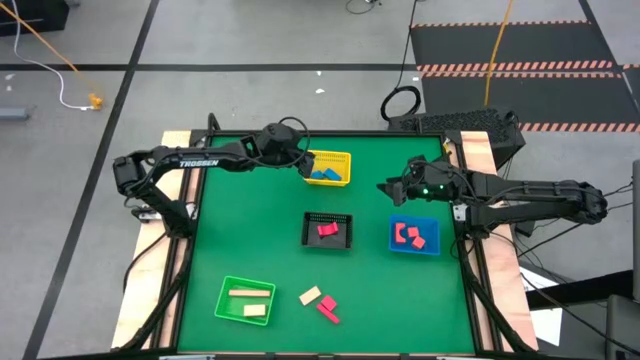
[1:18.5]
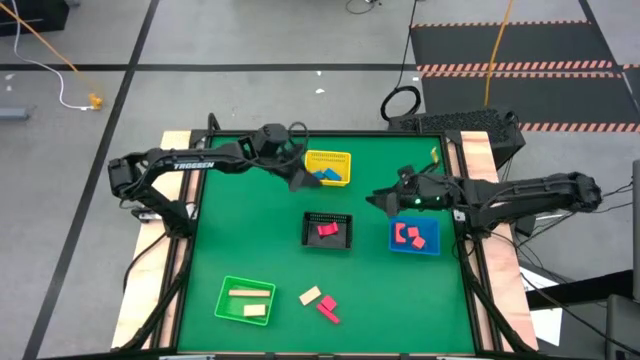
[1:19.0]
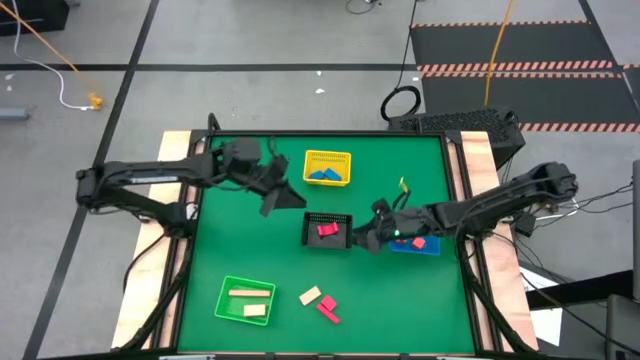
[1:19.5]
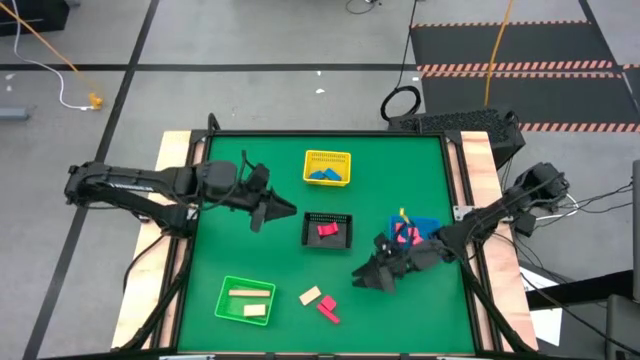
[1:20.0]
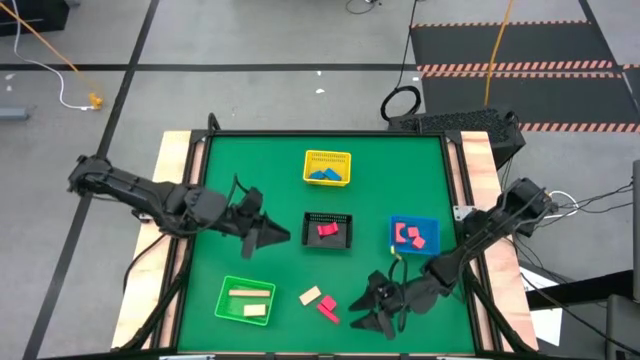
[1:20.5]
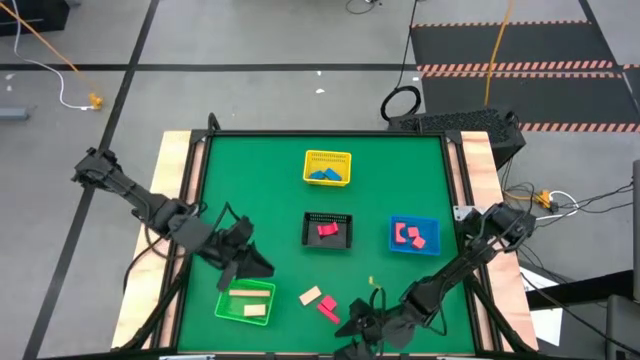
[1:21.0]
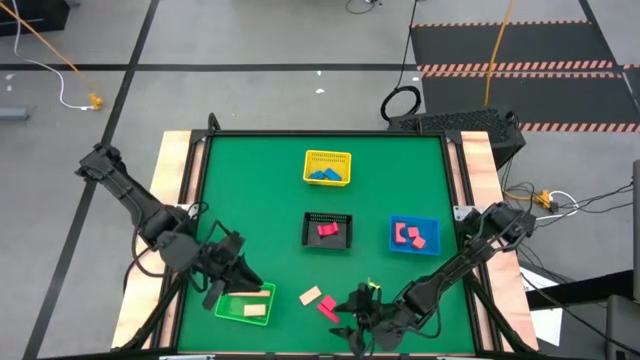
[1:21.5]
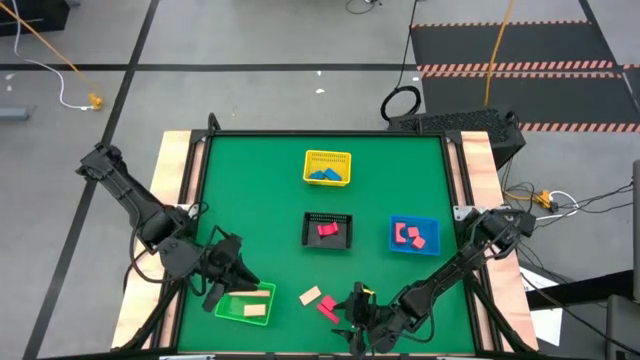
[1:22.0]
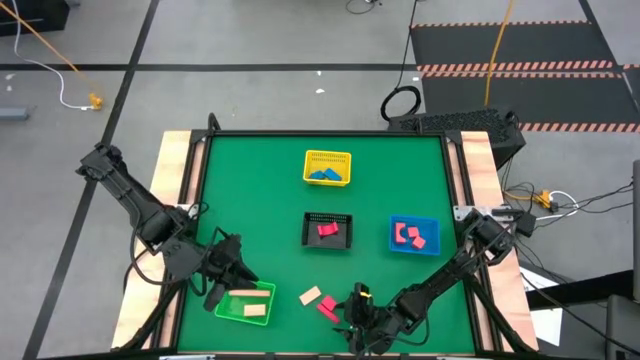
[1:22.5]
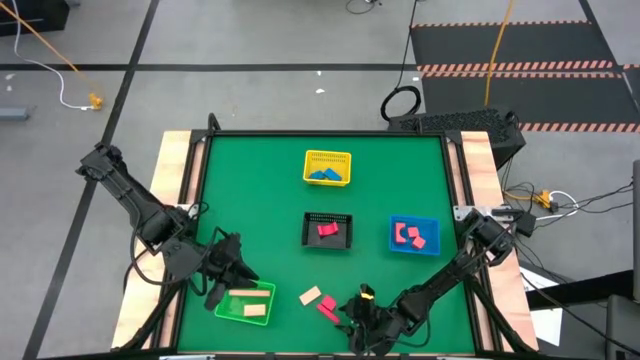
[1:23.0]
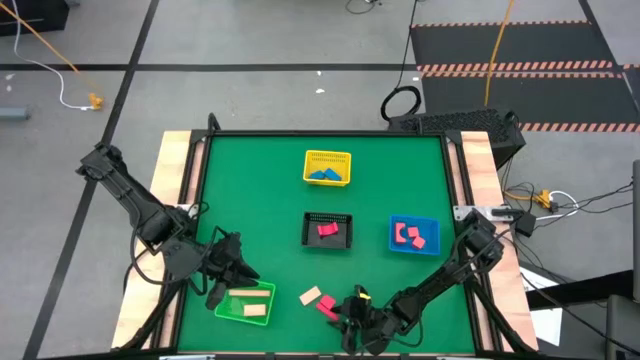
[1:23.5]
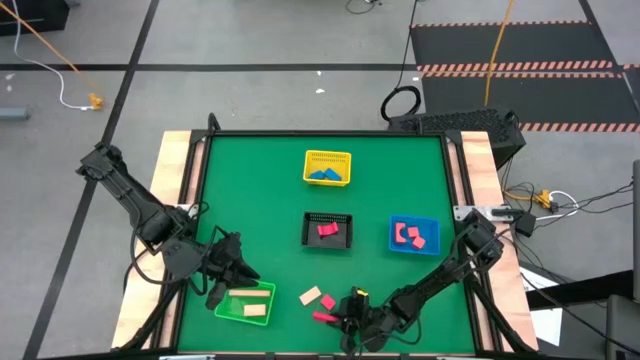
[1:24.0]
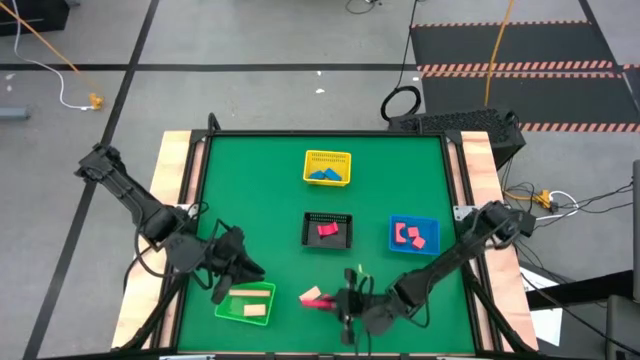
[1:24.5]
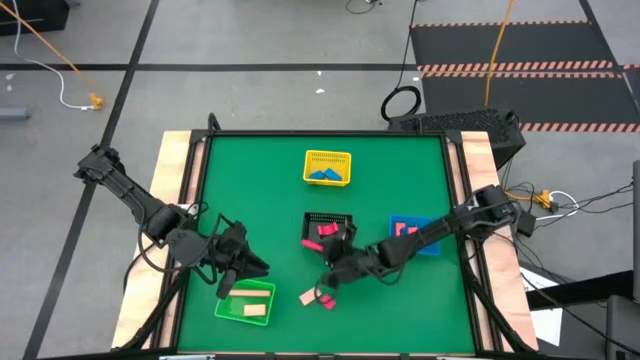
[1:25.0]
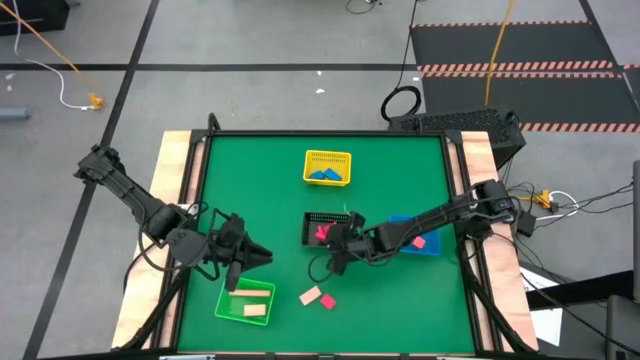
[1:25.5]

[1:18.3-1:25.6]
Task: Sort & place blocks by color
Put the left red block into the black bin

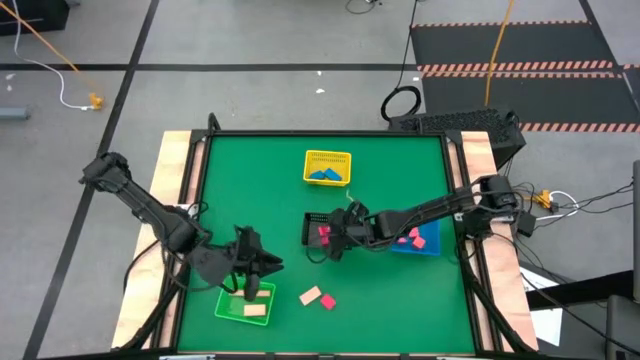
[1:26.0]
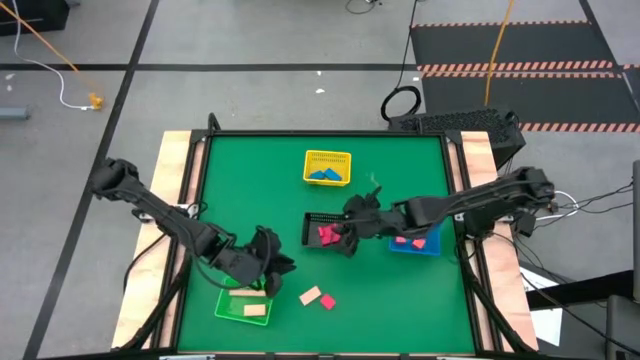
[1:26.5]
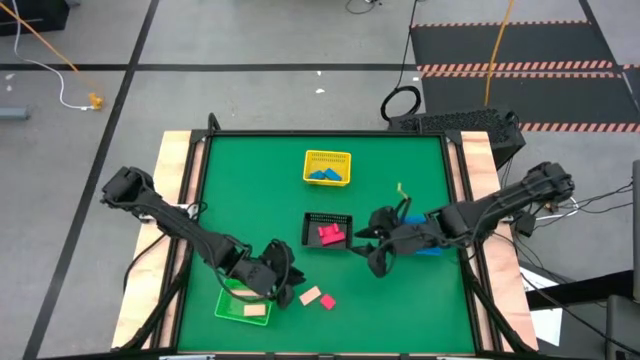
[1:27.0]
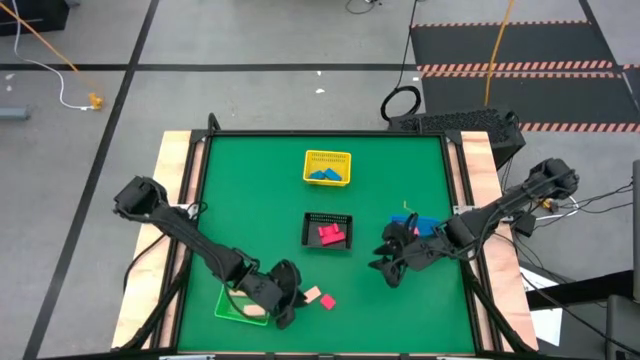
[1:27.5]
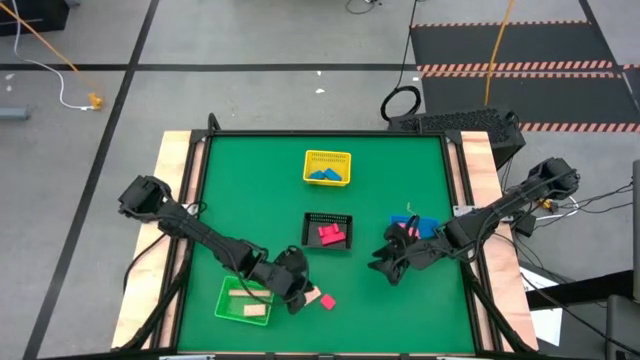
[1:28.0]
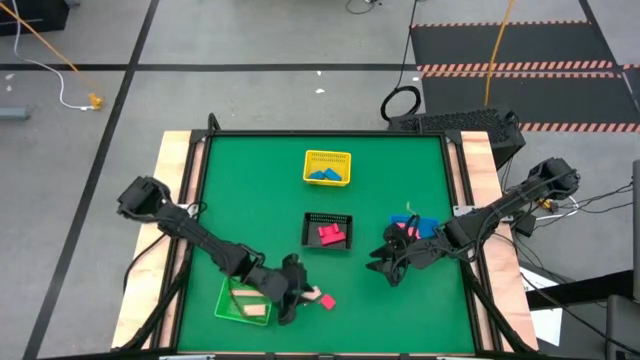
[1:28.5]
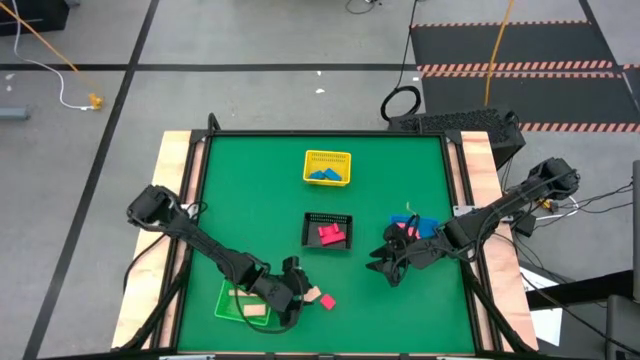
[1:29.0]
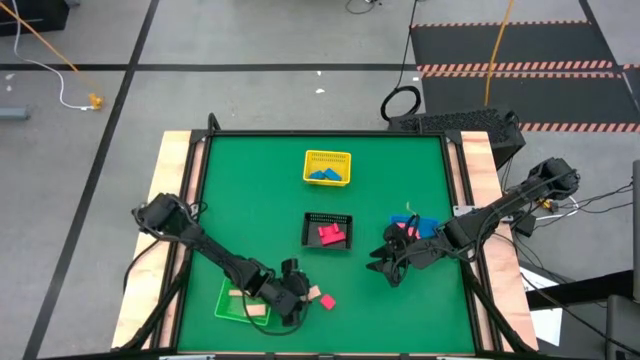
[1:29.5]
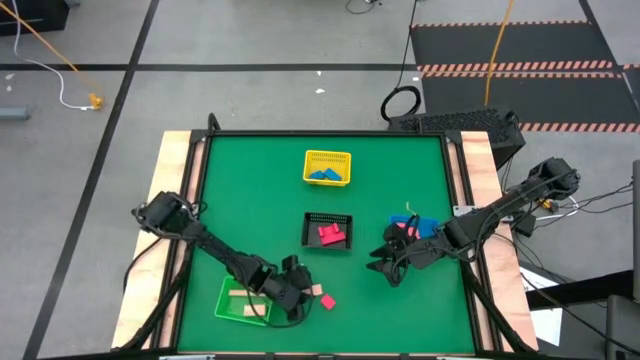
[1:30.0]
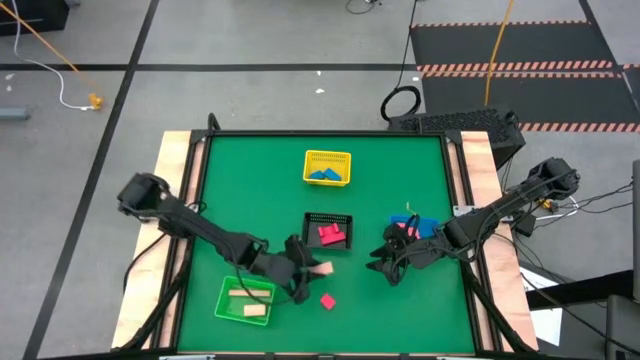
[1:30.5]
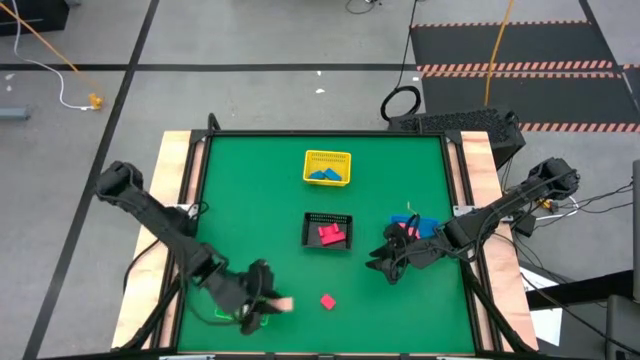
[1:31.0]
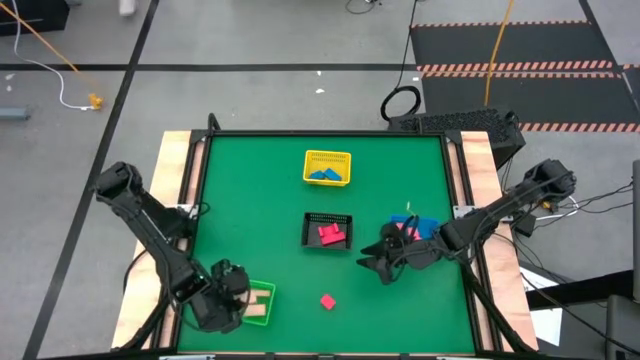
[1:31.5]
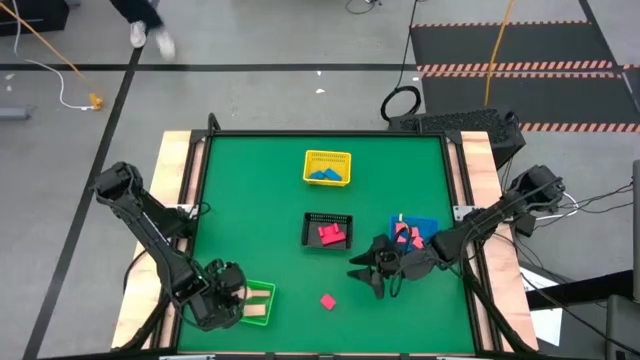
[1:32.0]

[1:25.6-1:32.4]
Put the brown block into the green bin

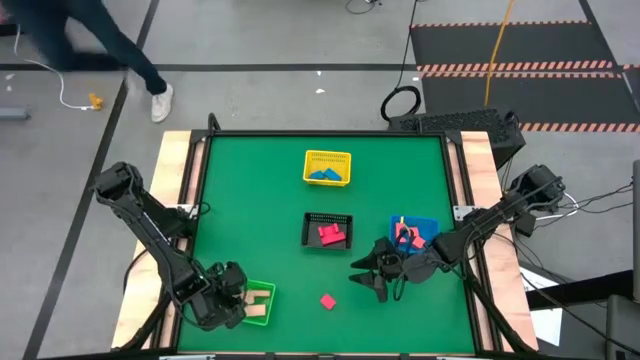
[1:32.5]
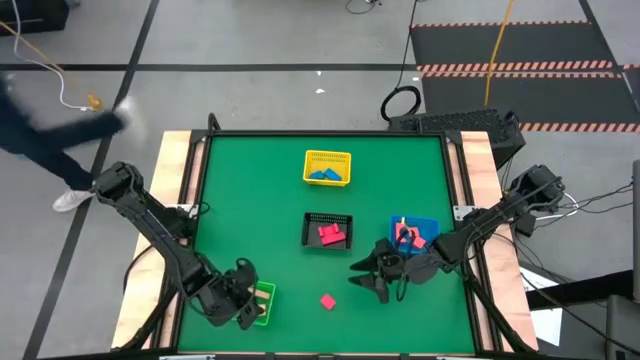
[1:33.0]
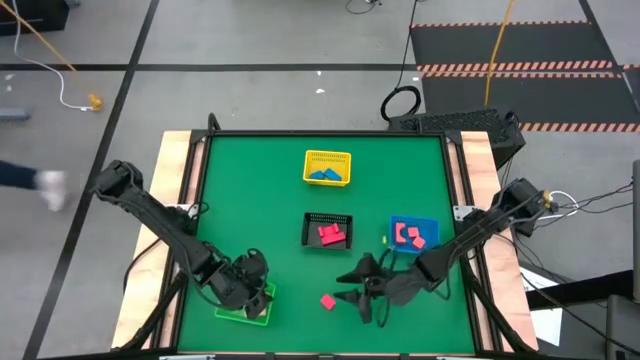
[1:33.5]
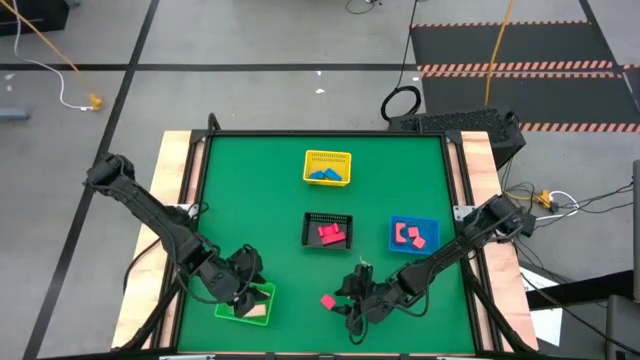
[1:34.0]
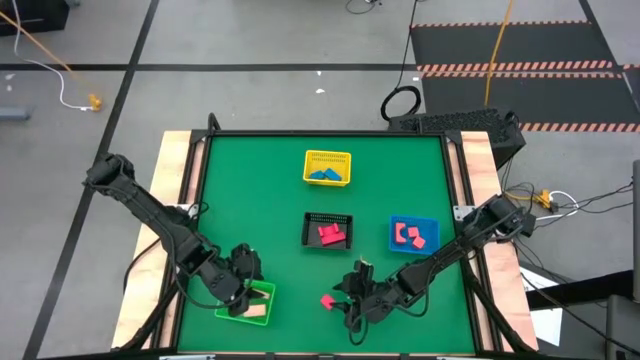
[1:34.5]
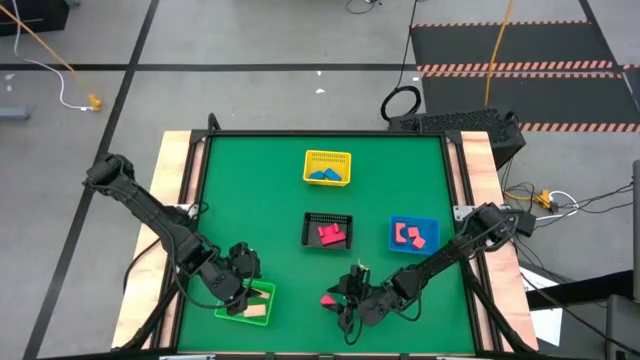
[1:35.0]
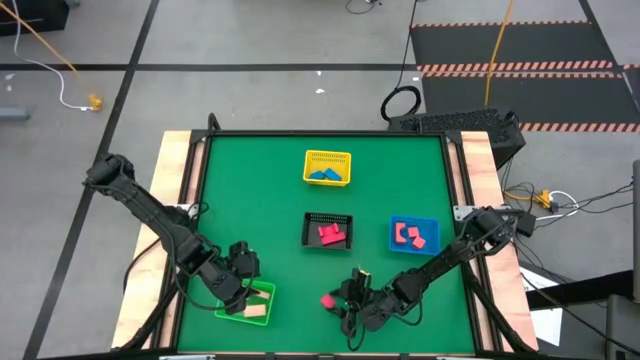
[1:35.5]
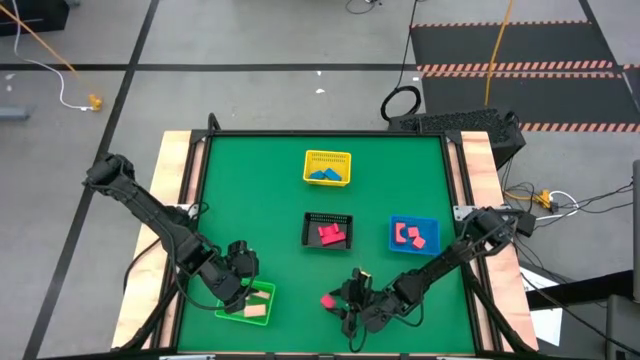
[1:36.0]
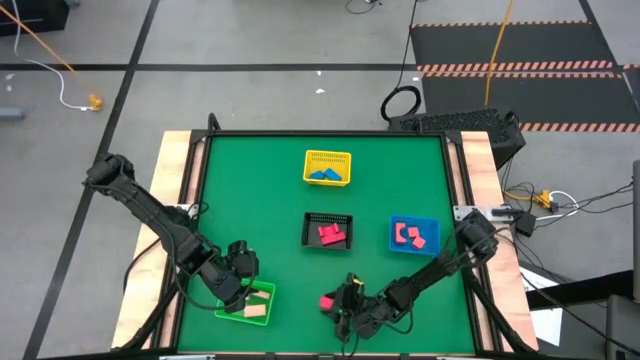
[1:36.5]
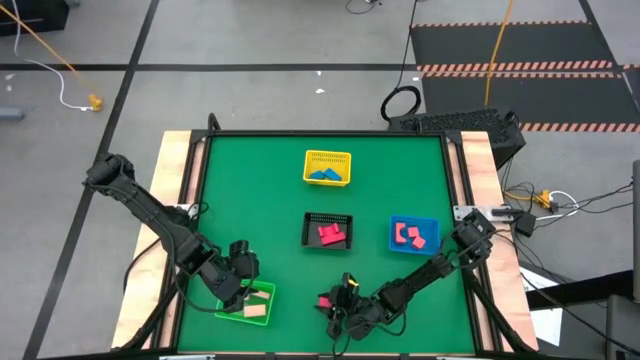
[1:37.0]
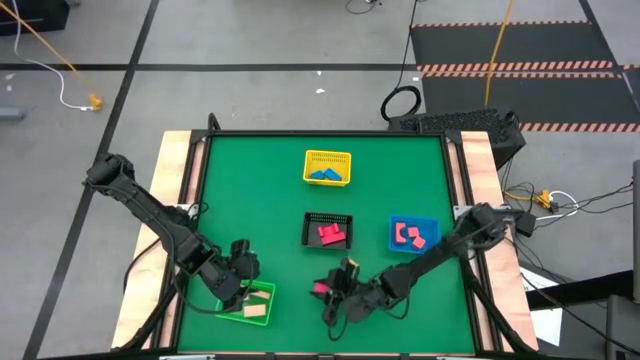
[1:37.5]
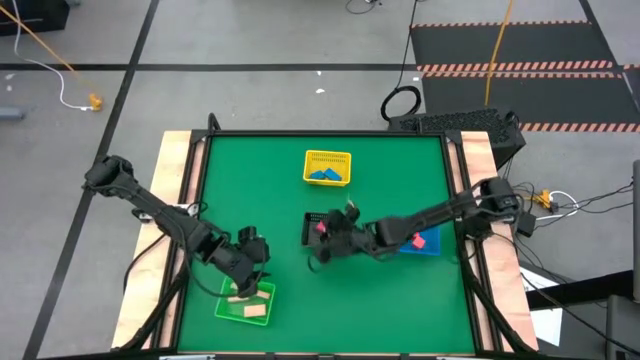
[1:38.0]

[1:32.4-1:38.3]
Put the red block into the black bin
